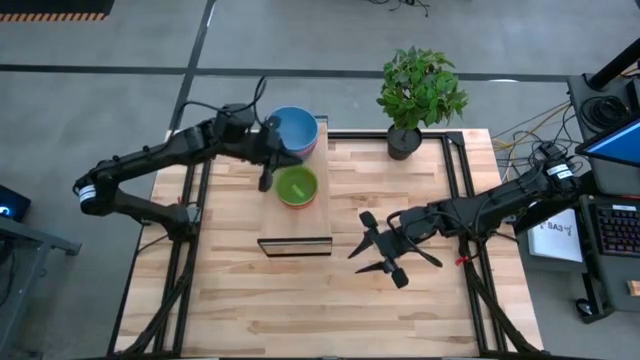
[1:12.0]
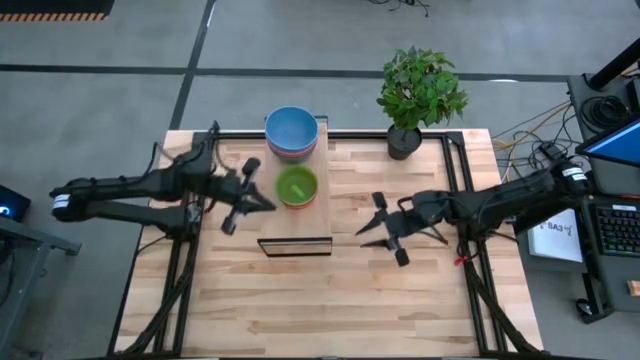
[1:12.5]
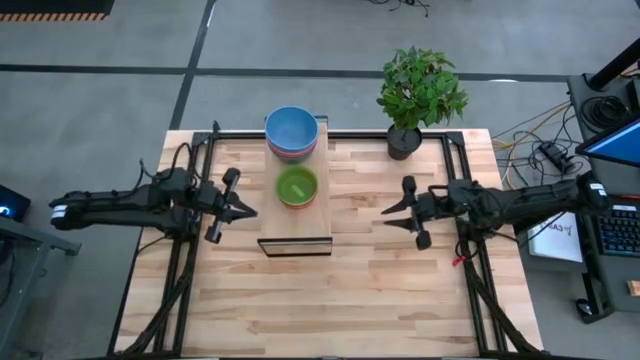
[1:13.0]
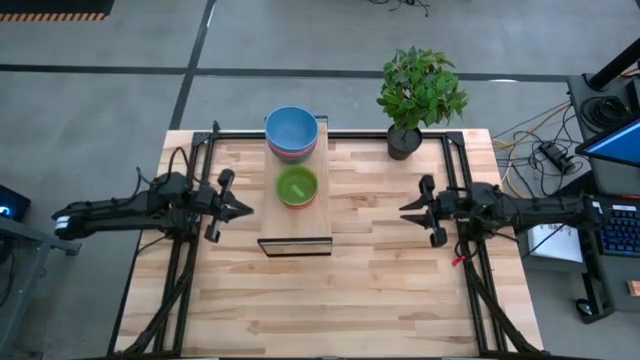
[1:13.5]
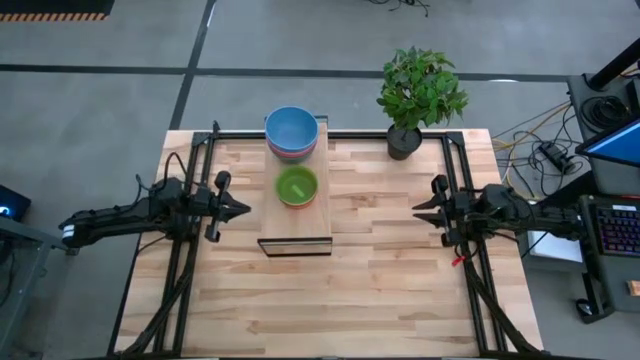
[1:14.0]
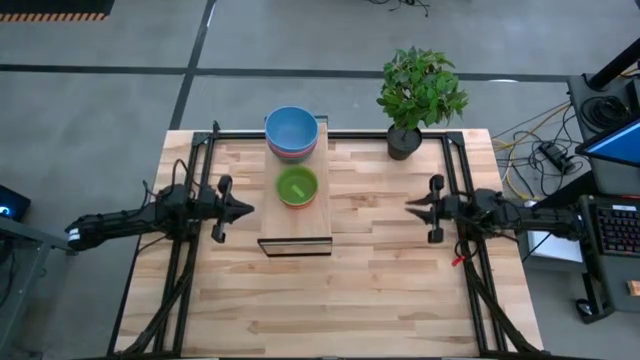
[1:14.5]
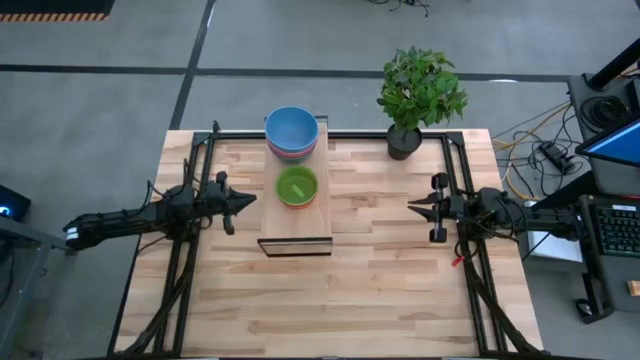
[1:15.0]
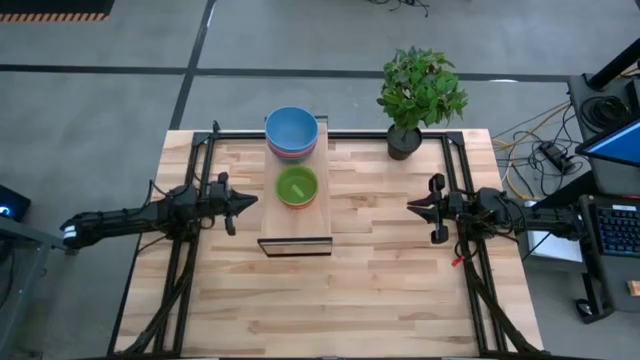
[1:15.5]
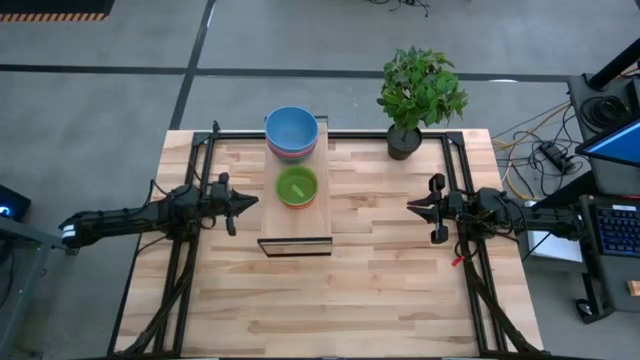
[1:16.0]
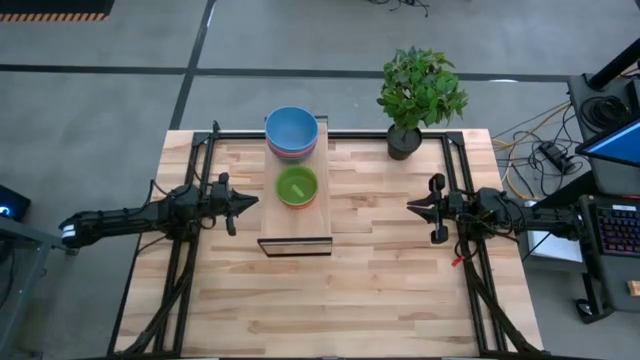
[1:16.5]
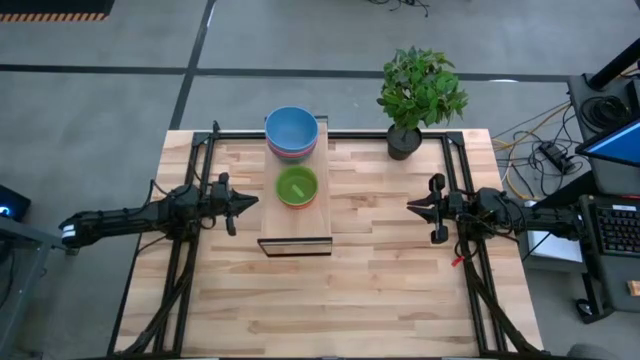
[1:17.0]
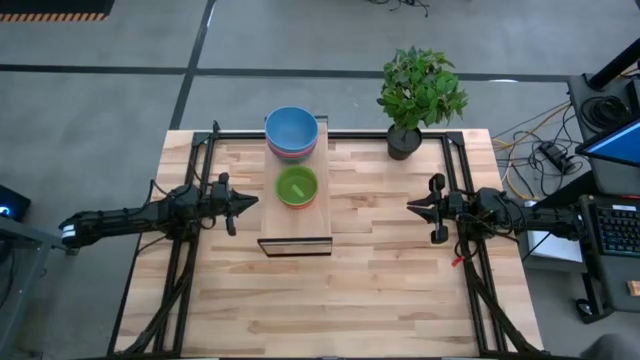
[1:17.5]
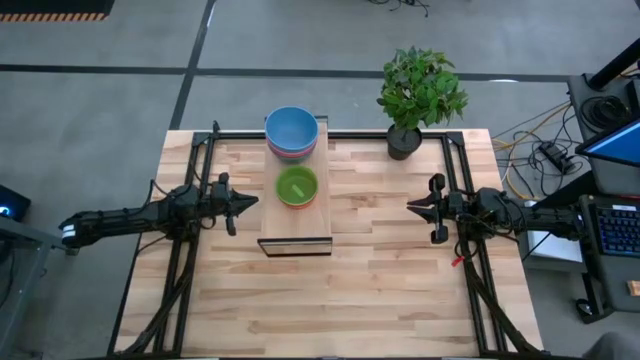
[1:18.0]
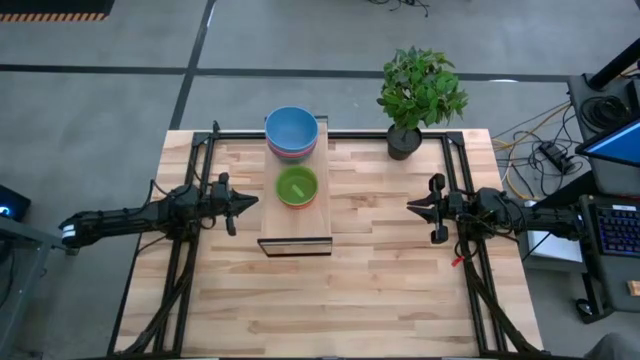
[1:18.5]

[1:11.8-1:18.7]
Task: Place and stack bowls onto a shelf
Return to Home Position

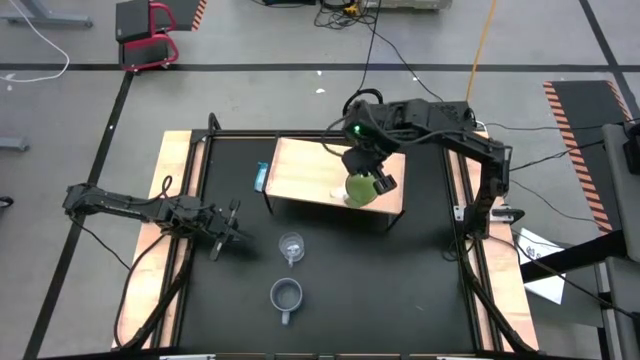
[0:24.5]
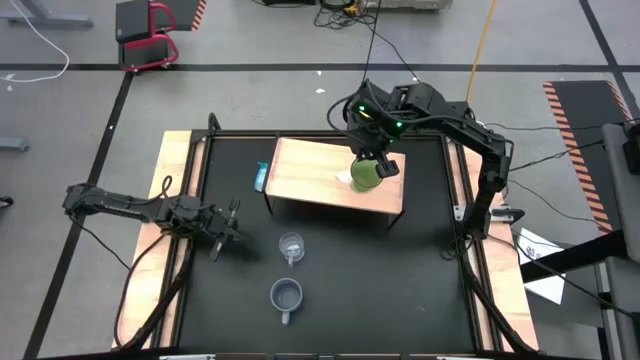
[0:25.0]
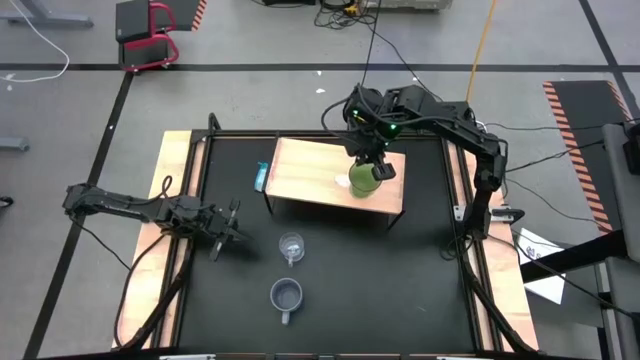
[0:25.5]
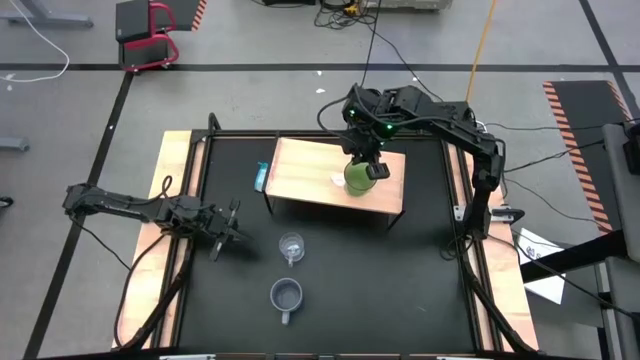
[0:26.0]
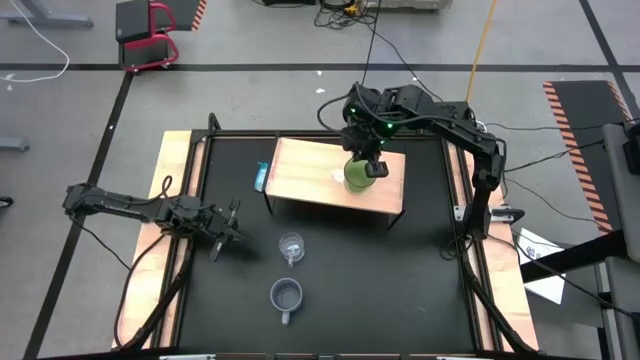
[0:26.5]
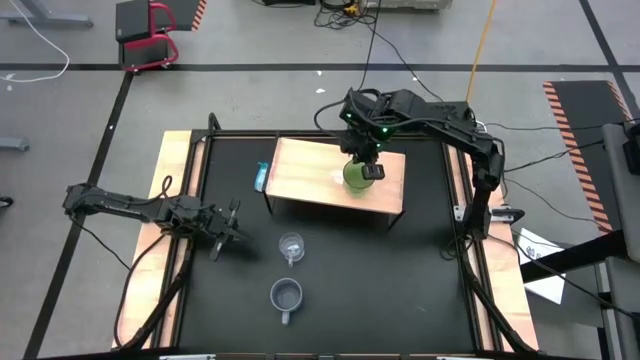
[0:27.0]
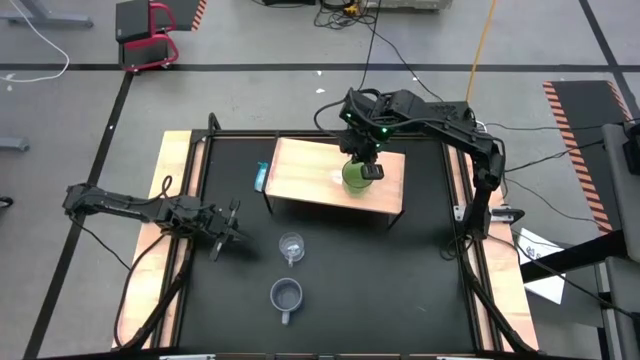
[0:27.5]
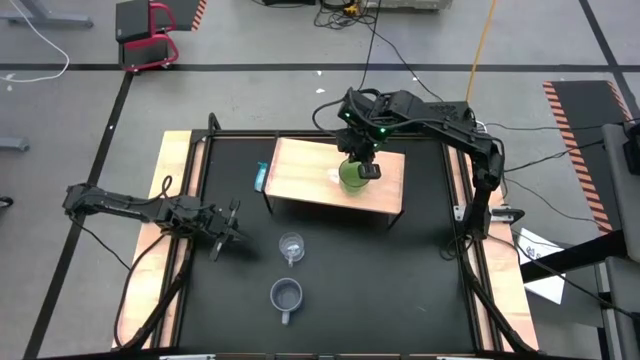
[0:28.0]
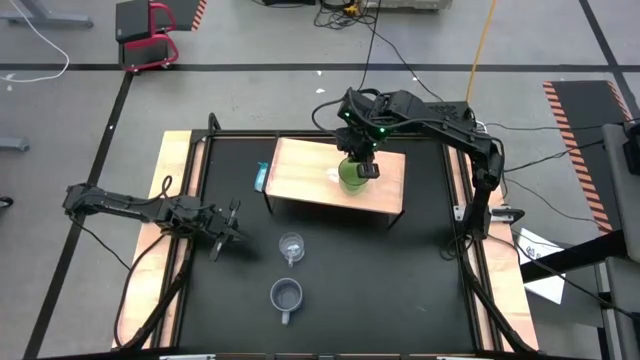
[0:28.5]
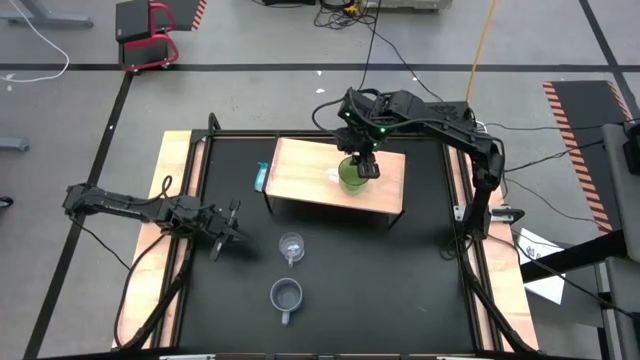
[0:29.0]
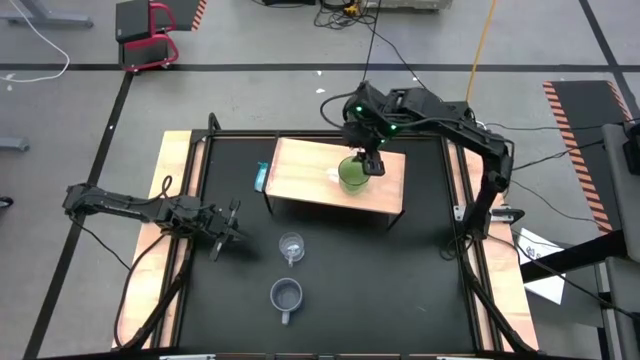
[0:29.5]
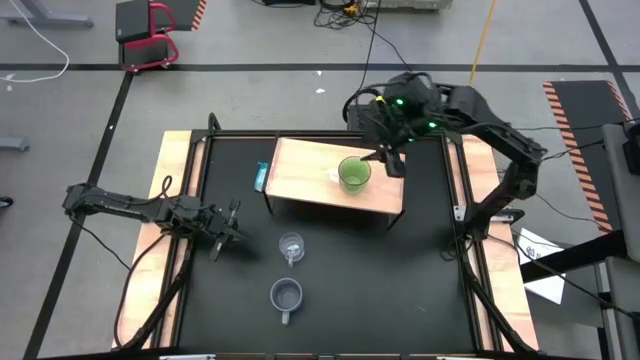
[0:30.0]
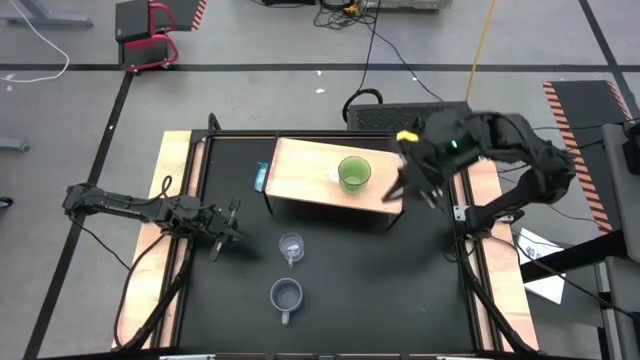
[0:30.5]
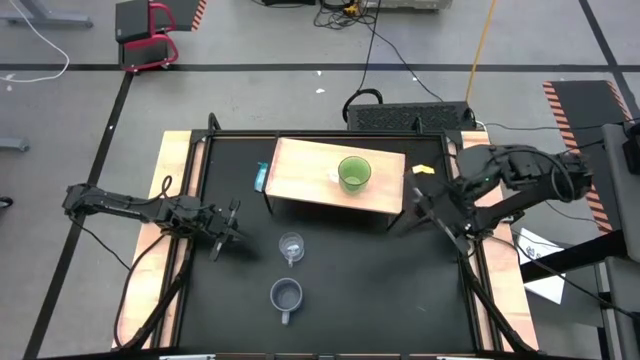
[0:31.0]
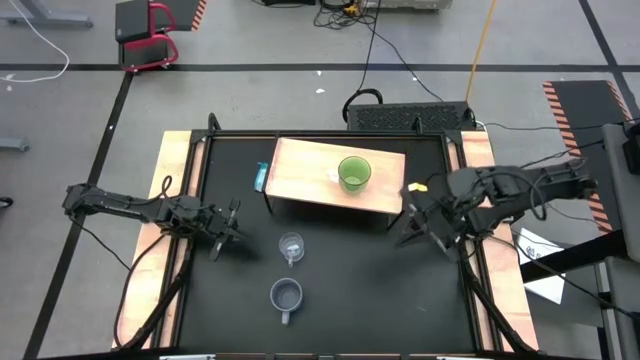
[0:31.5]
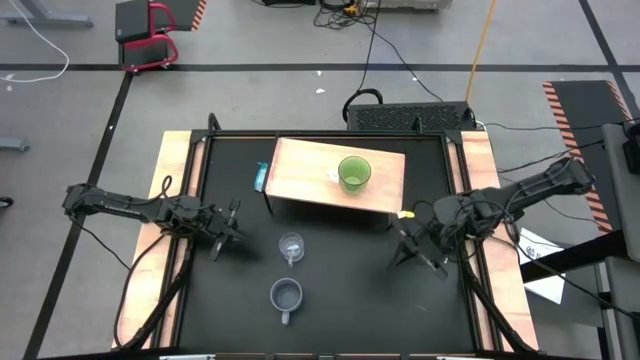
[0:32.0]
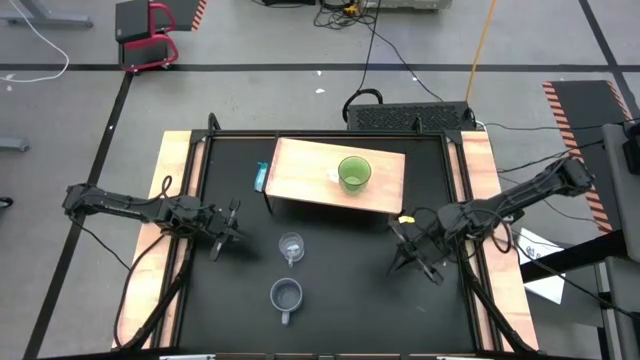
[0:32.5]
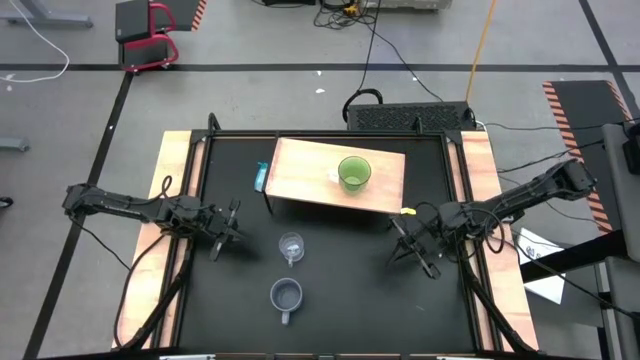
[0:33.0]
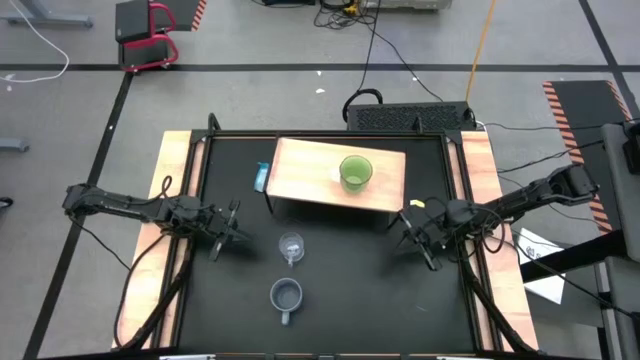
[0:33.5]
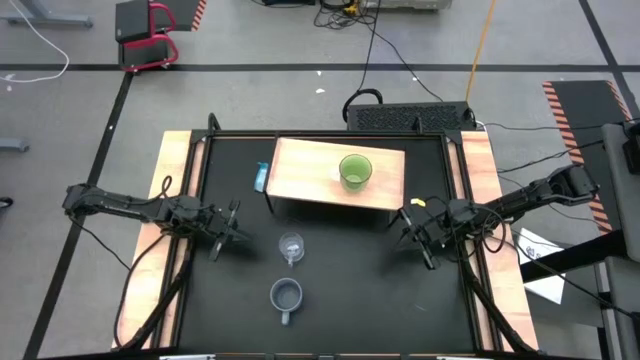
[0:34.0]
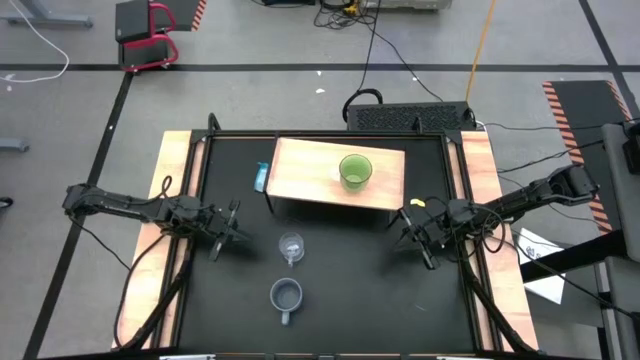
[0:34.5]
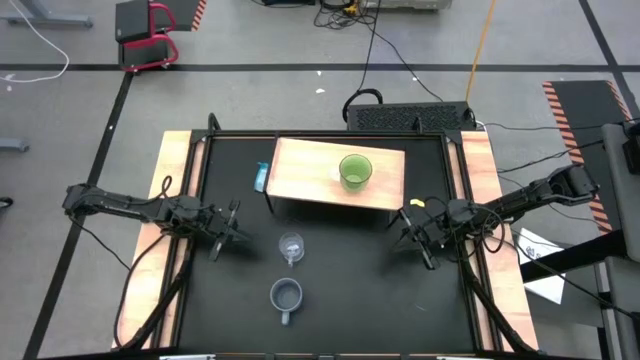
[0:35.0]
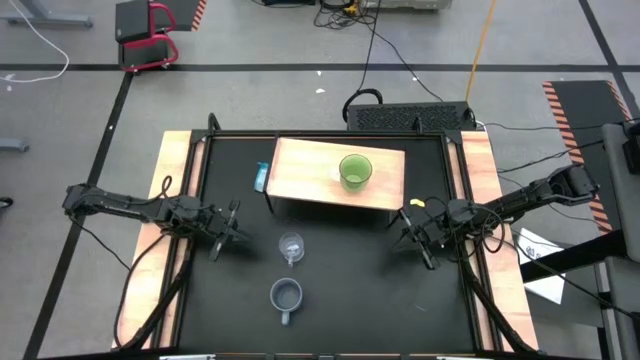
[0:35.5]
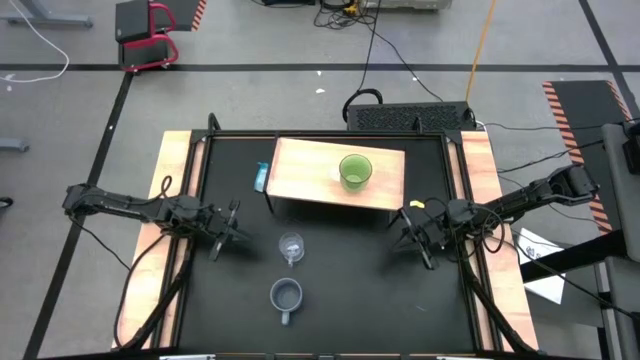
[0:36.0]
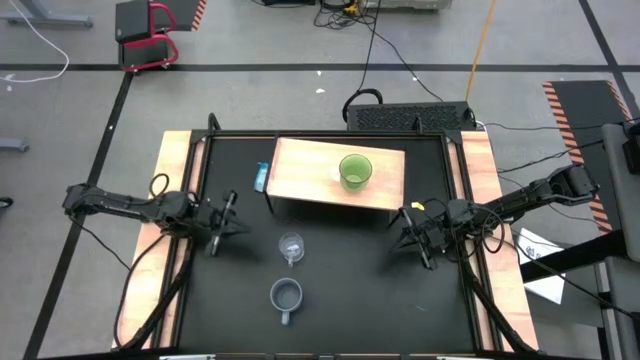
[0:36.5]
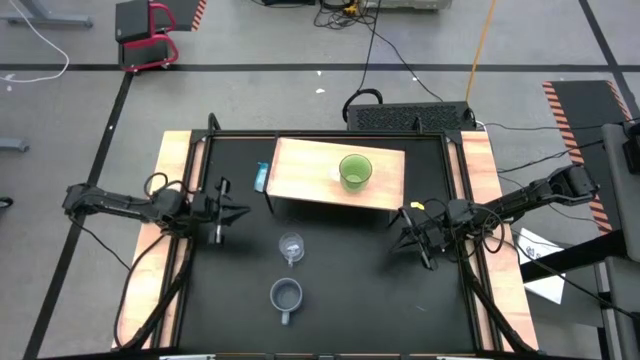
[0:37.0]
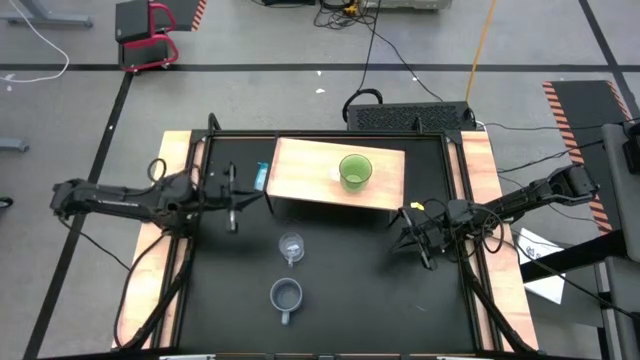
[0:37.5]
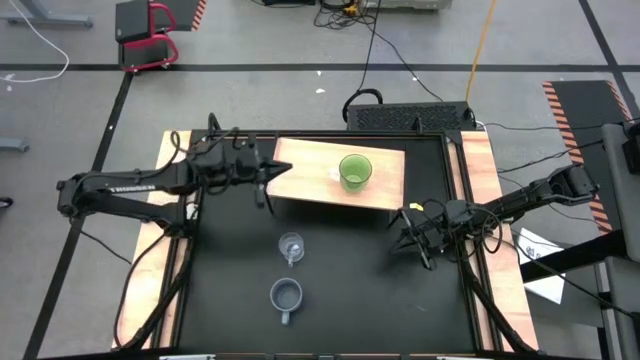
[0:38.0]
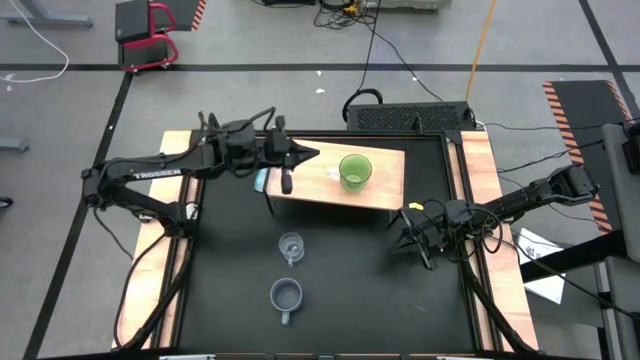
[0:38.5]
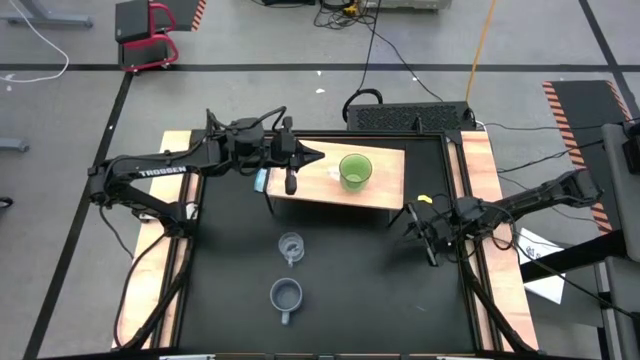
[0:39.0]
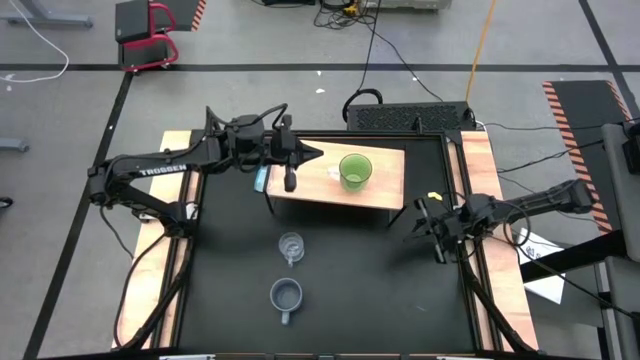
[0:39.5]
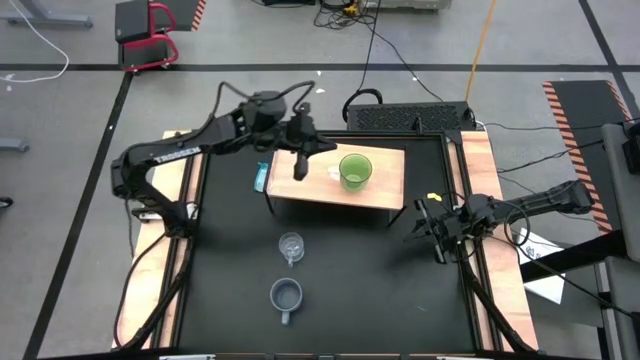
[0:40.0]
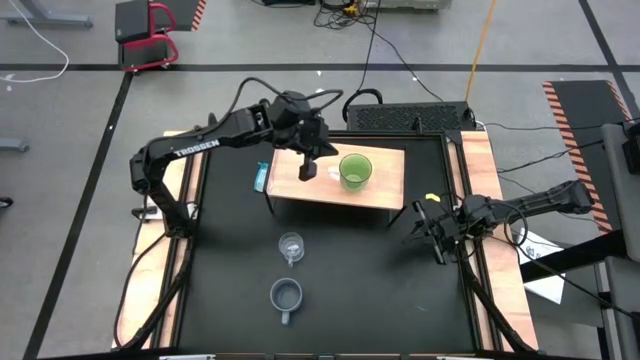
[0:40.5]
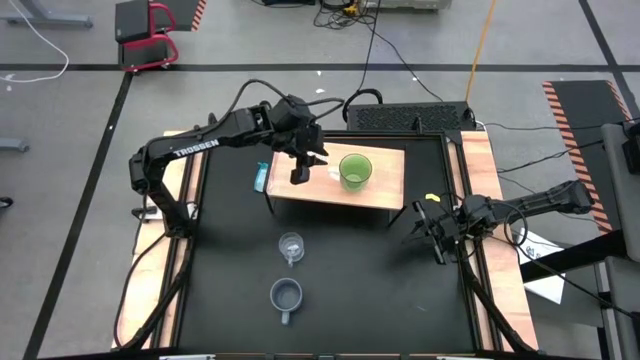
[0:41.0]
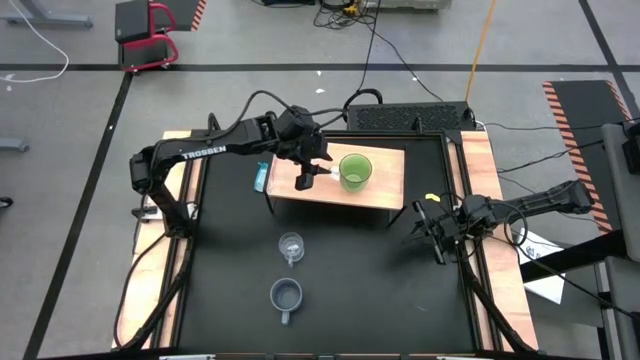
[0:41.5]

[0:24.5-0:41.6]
Task: Stack small to large cups/mugs on shelf
Put the green cup on the shelf
